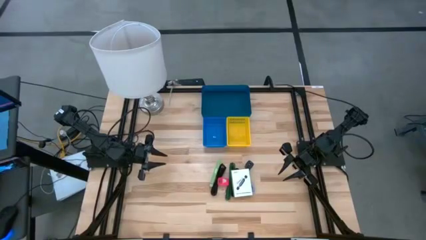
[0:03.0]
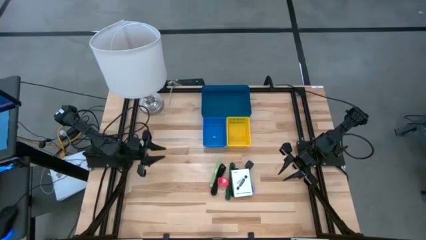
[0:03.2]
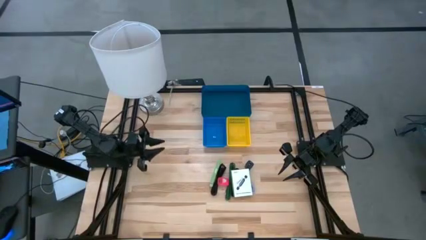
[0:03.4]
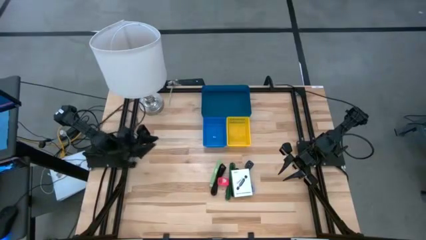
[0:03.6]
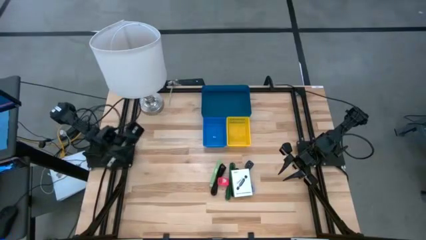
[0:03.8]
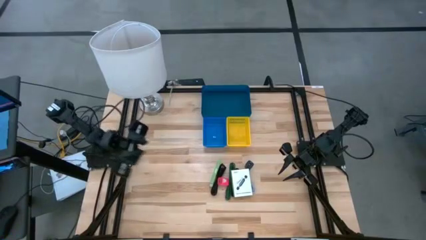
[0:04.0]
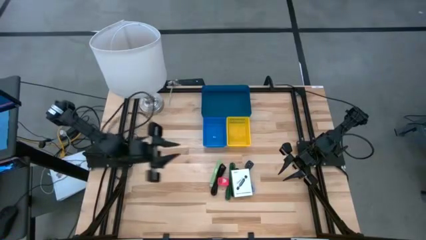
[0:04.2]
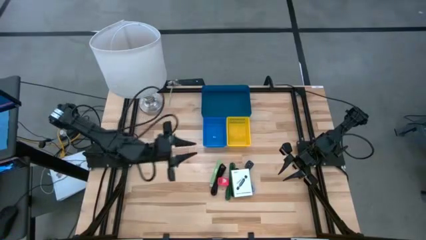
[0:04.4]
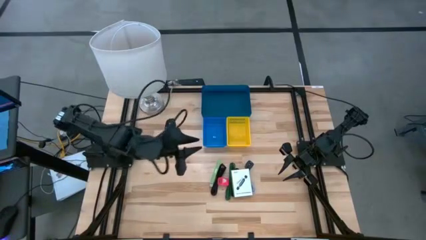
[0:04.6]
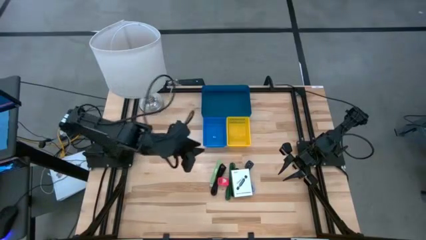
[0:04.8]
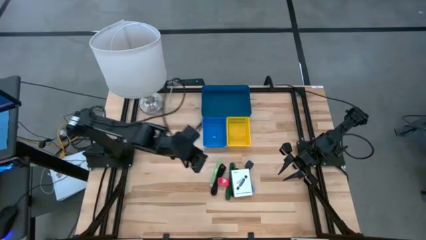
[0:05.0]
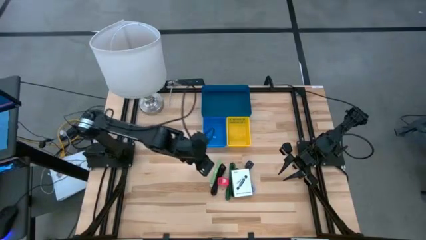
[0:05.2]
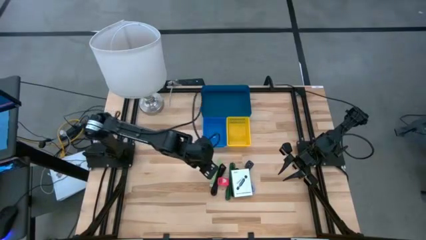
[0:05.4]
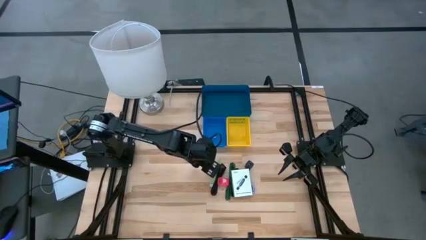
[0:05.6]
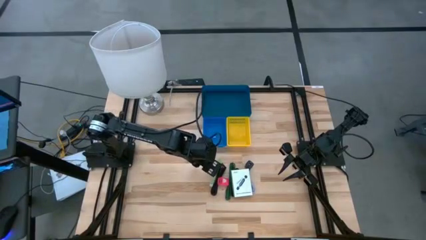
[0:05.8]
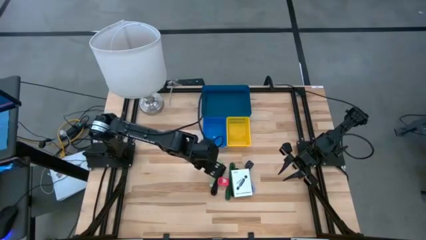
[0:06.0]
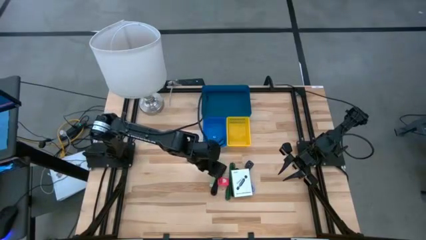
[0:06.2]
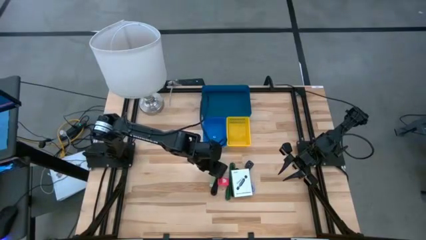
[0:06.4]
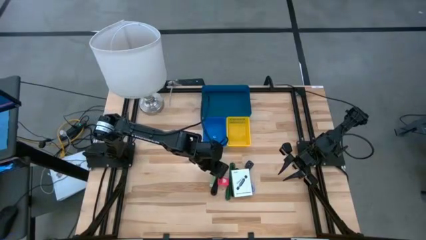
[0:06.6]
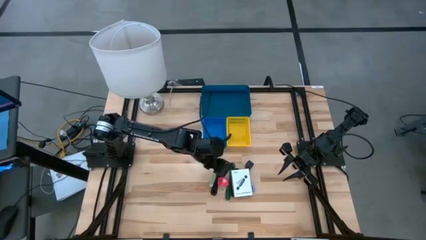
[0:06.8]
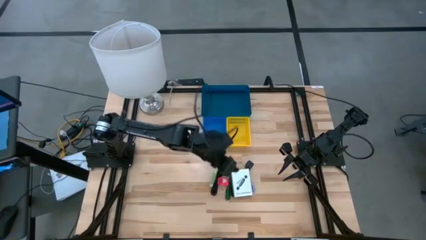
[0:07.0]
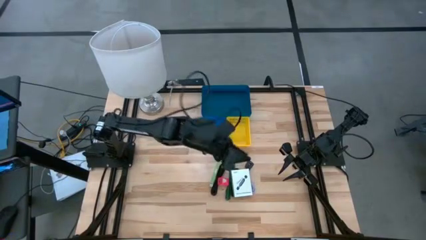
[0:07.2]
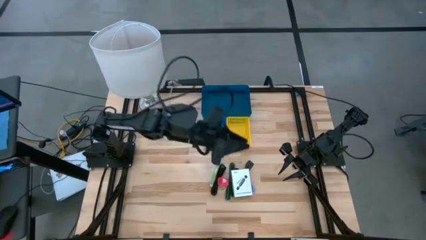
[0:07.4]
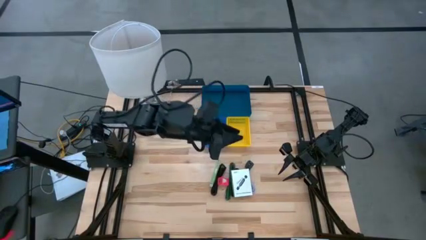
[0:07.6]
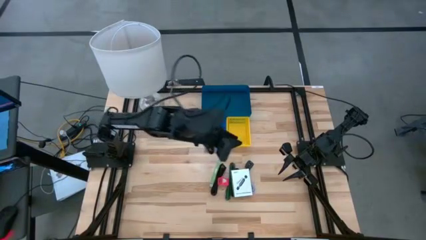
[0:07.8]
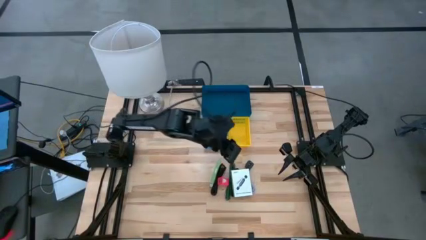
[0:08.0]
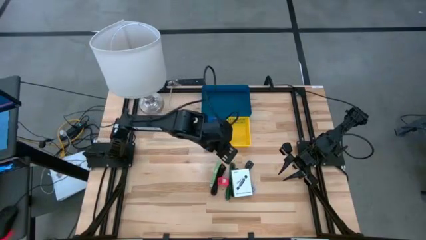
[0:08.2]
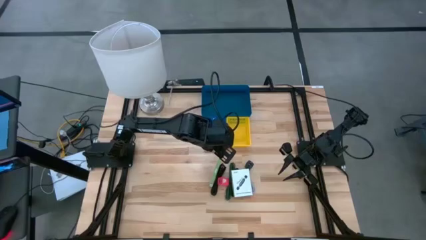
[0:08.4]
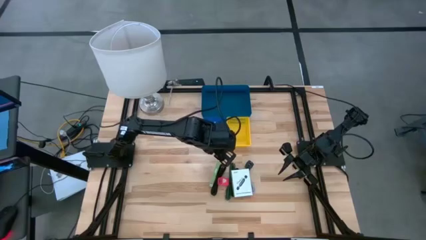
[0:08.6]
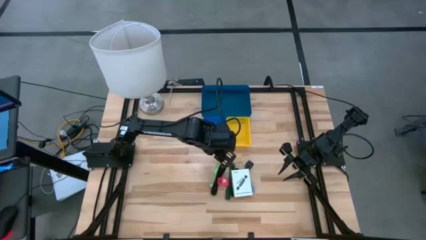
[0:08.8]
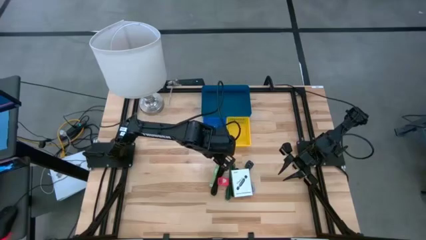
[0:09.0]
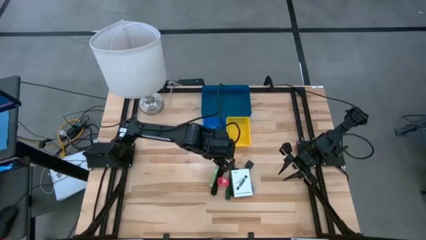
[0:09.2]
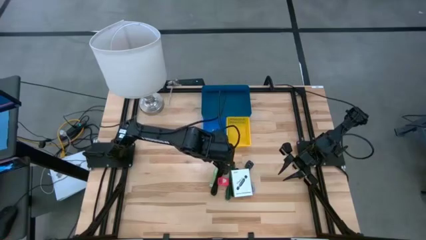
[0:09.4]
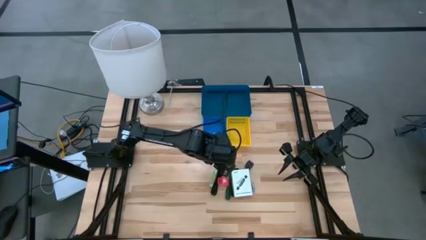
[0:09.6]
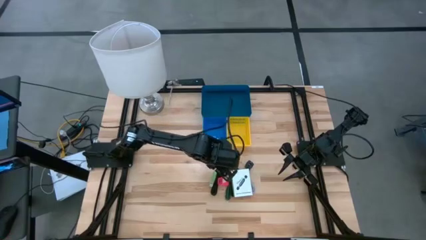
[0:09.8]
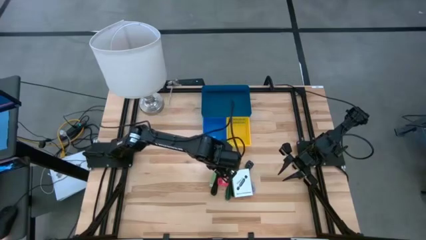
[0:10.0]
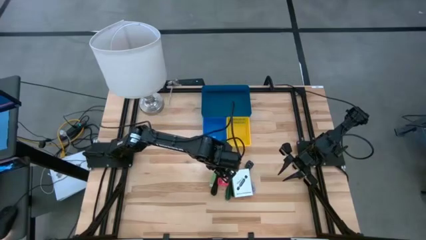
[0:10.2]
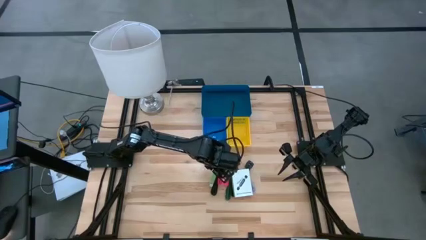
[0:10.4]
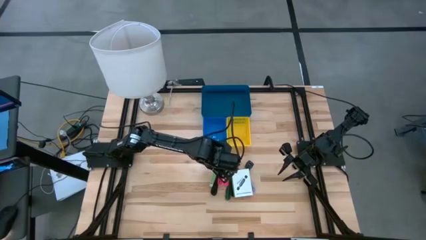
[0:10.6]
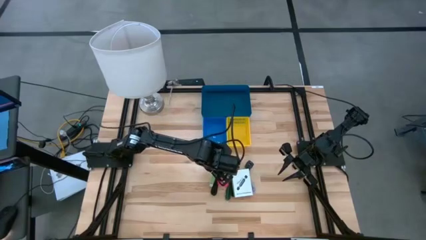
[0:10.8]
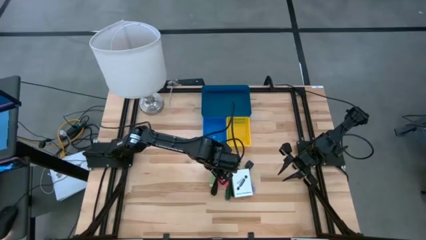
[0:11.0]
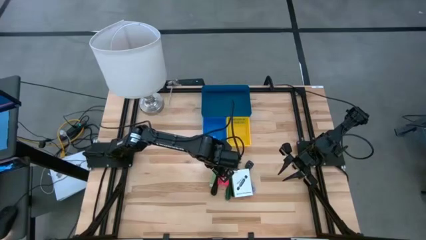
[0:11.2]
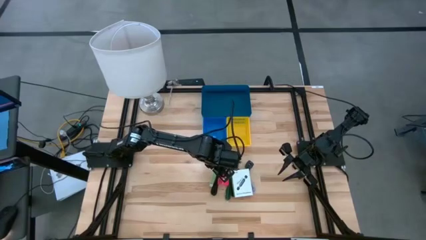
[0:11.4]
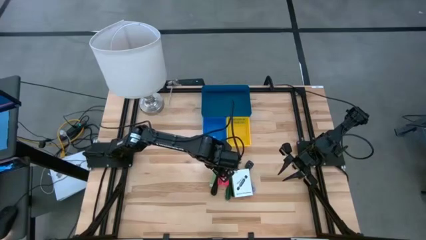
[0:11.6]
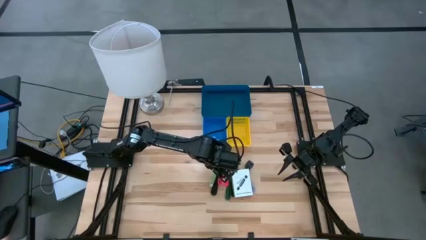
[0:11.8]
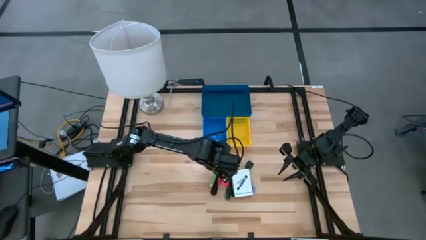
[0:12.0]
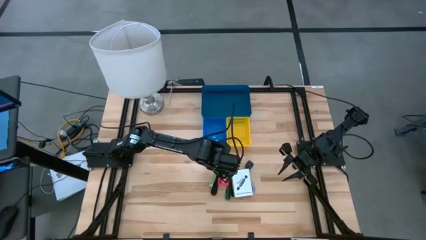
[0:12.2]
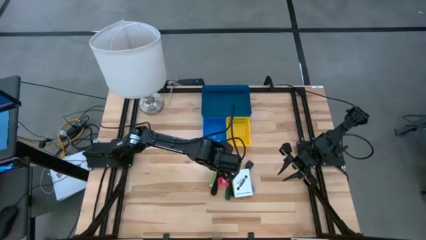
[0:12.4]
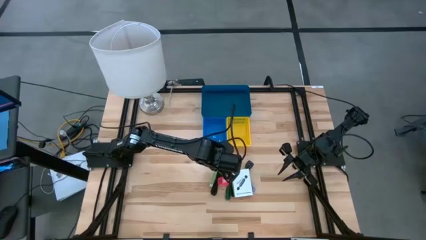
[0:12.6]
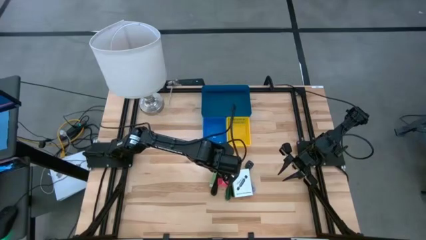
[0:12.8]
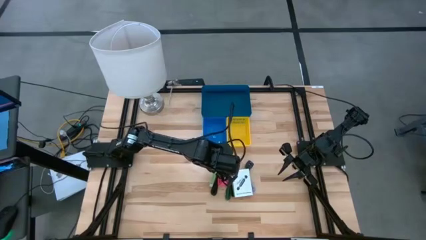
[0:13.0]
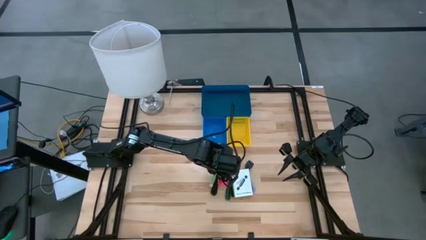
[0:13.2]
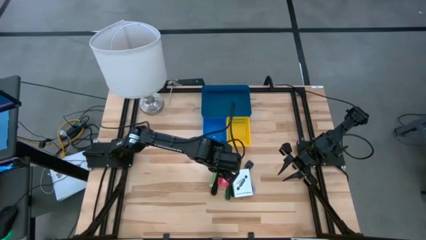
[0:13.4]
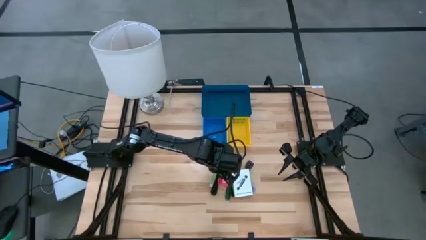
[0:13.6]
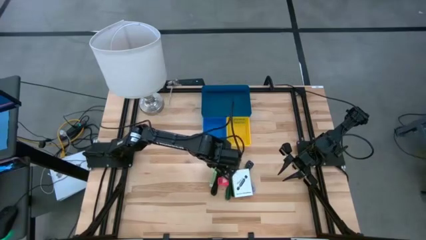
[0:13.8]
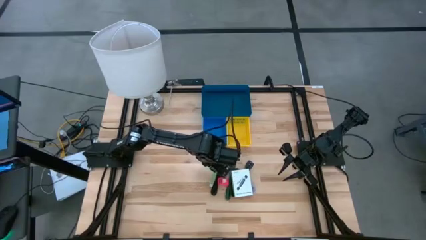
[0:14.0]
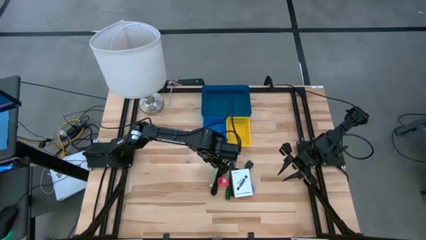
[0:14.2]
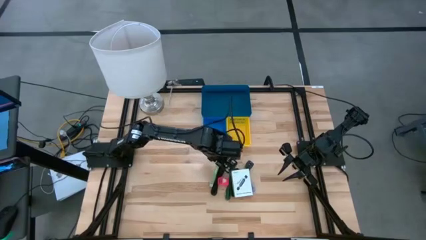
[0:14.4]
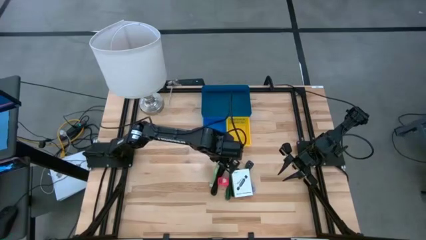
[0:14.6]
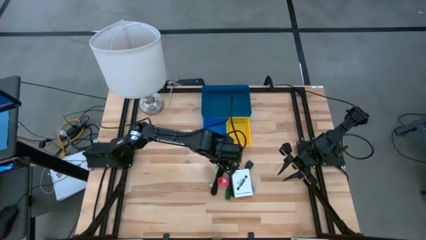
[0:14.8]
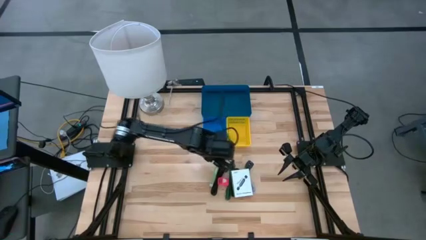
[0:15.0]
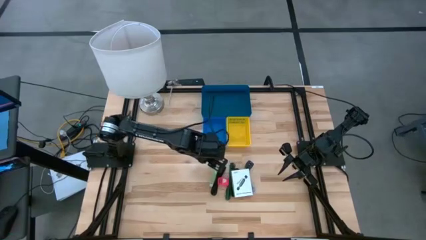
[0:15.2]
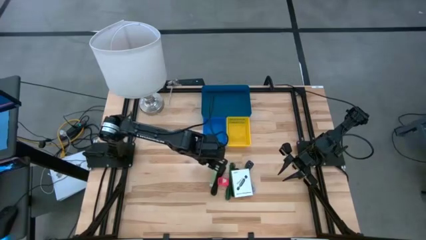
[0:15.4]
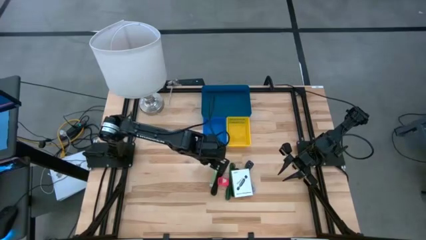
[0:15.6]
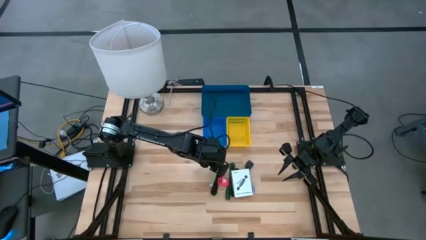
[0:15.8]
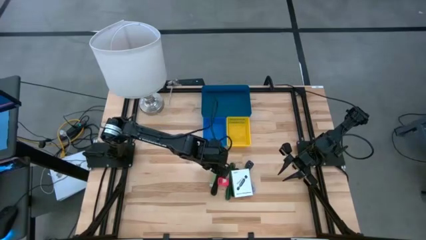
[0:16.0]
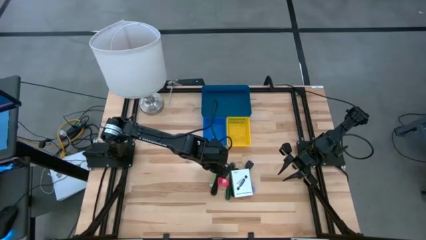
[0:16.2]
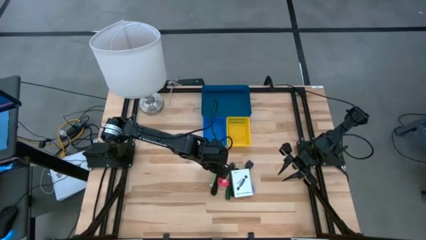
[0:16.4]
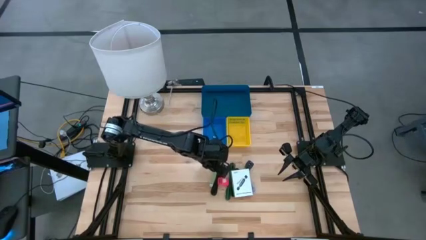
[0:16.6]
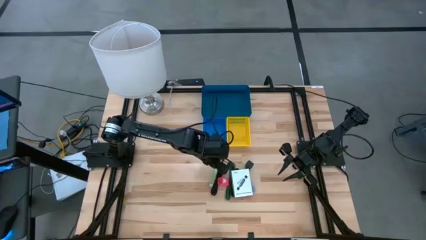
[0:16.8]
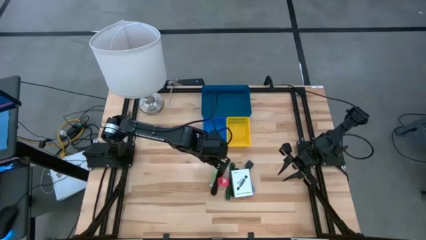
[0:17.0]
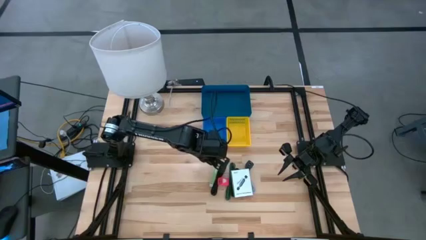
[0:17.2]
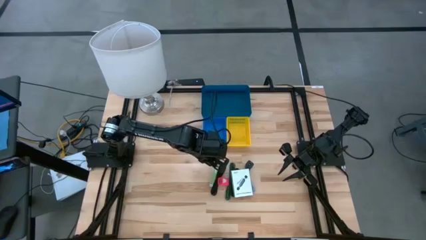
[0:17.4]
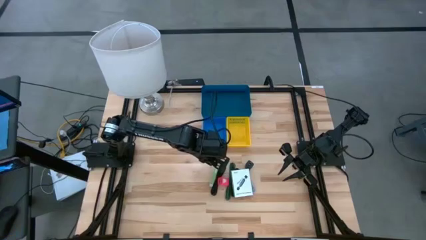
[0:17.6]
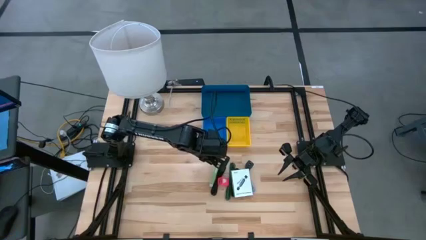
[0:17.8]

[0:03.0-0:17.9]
Task: Pick and place items into bin
Put the card reader box into the blue bin
